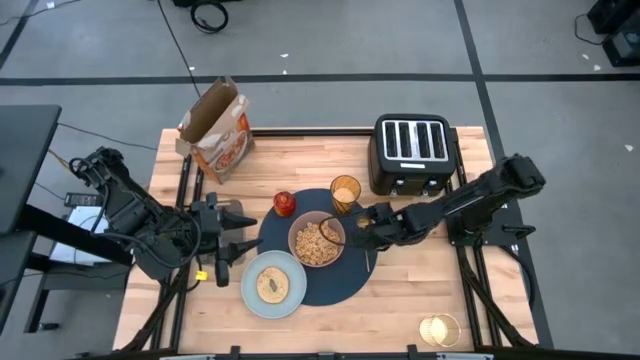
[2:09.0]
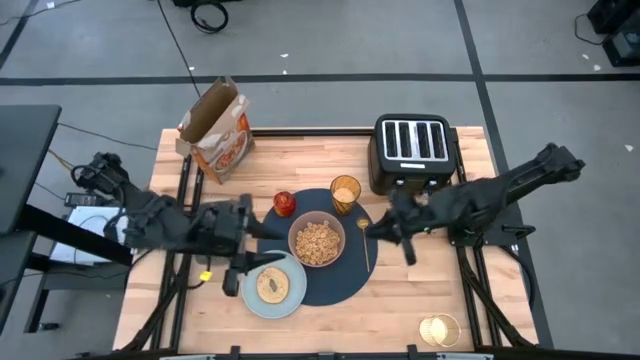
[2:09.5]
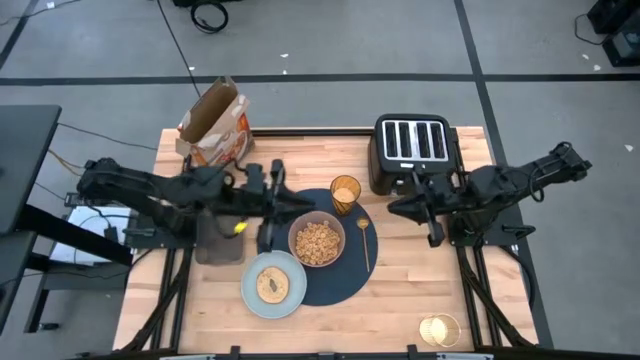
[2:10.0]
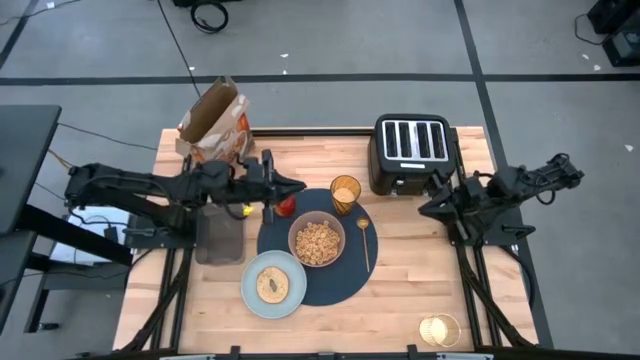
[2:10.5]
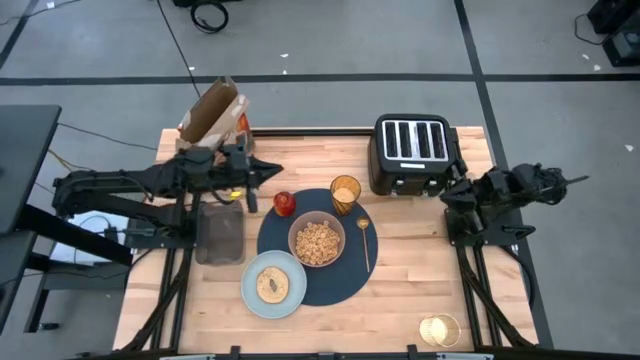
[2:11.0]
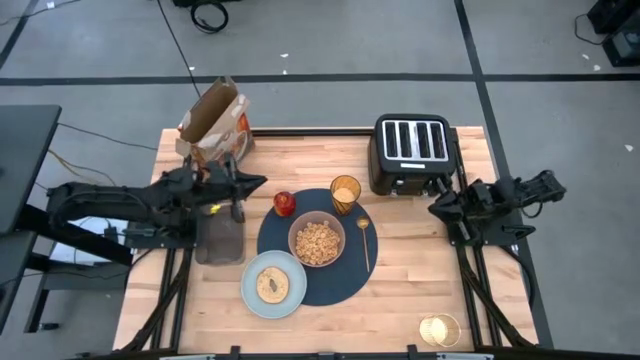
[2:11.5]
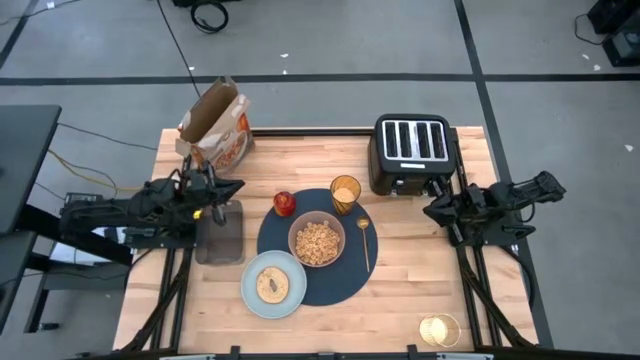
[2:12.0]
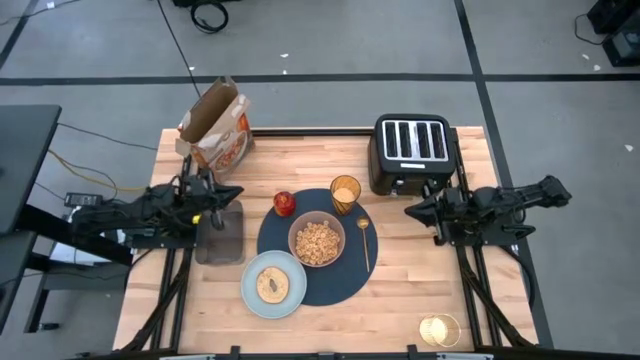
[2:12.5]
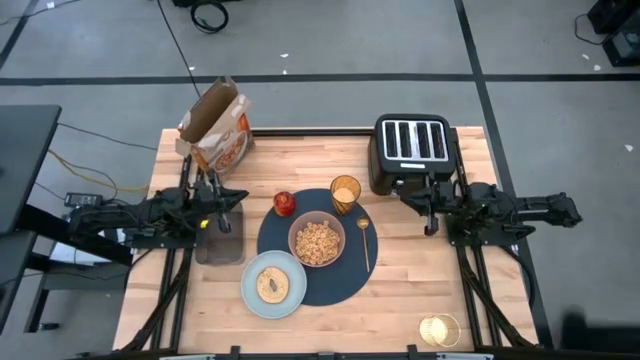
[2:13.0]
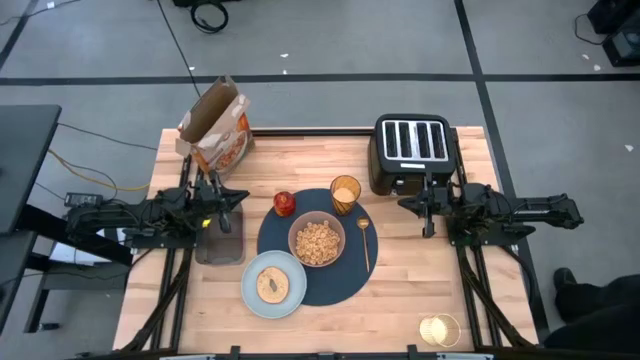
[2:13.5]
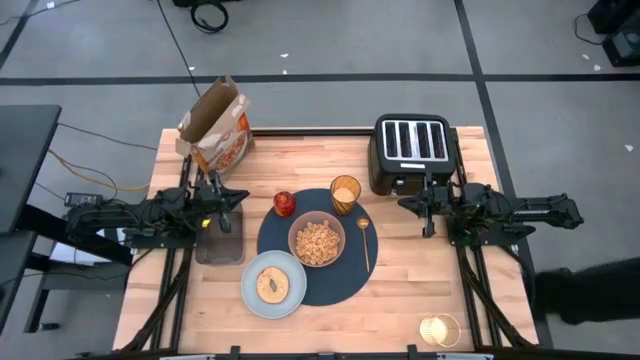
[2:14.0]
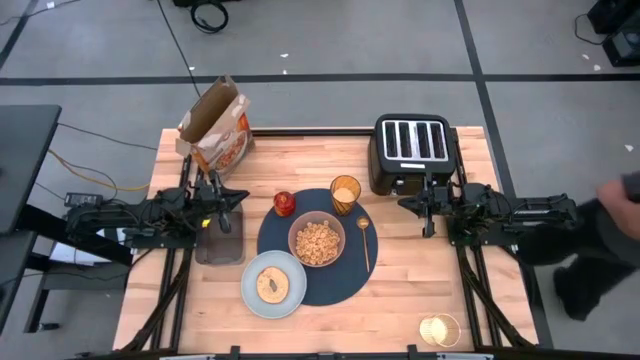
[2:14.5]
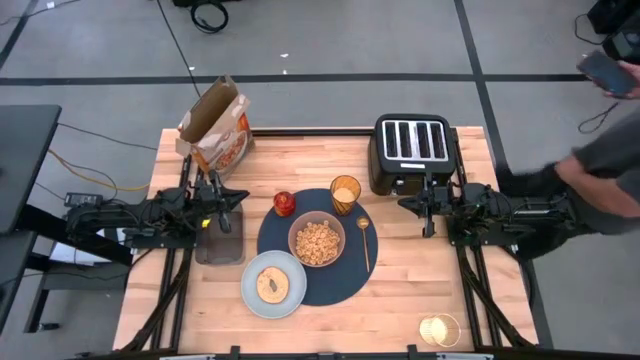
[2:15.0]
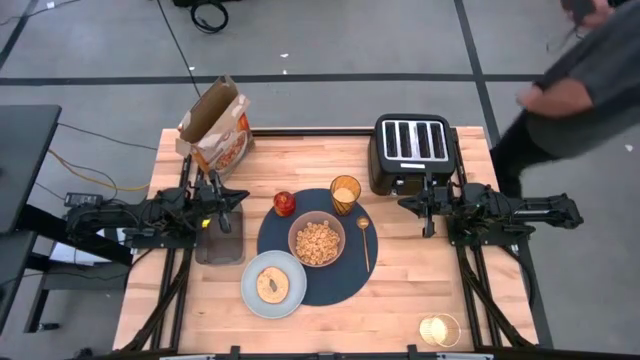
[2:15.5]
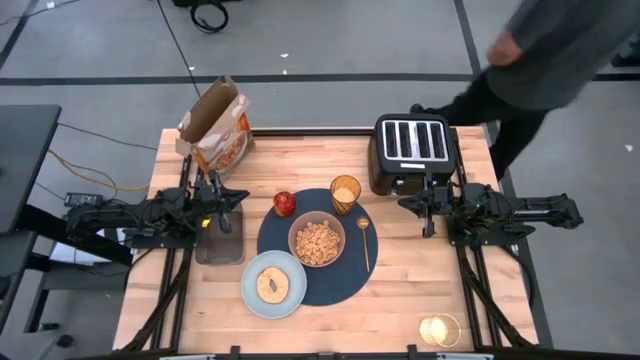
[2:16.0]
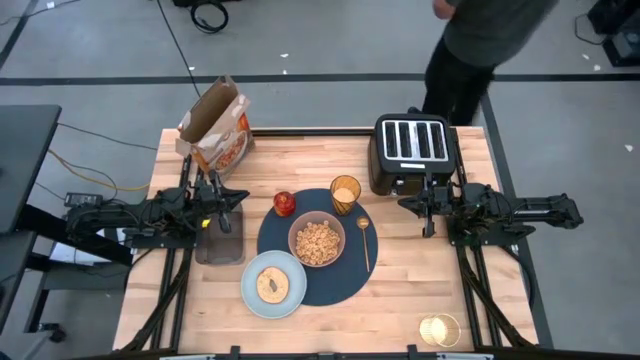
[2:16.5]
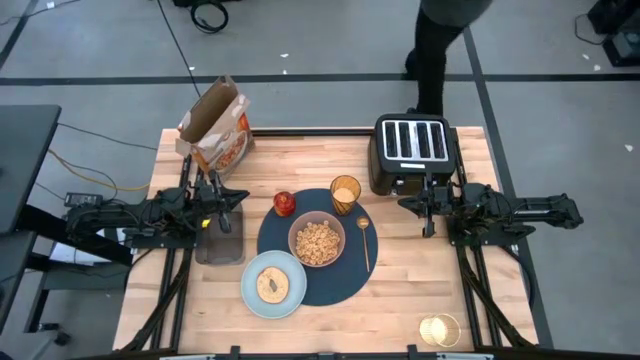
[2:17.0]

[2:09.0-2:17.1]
Task: Arrange a breakfast setting
Return to Home Position

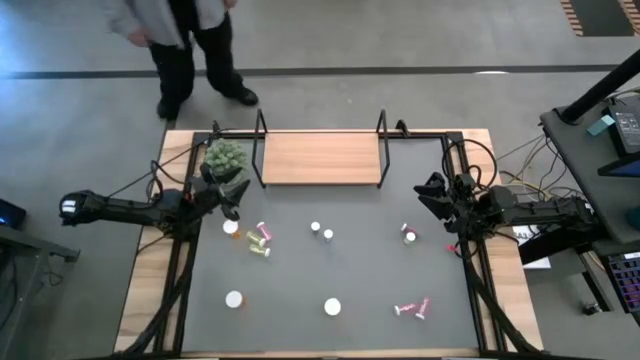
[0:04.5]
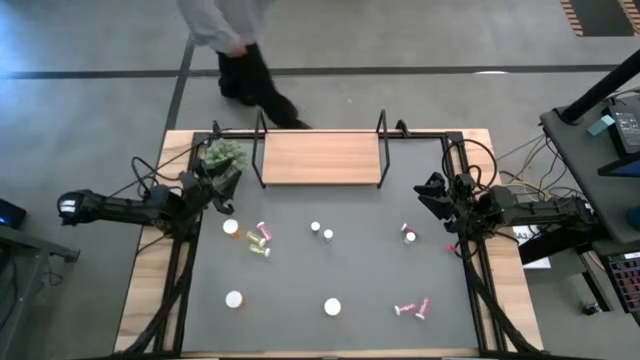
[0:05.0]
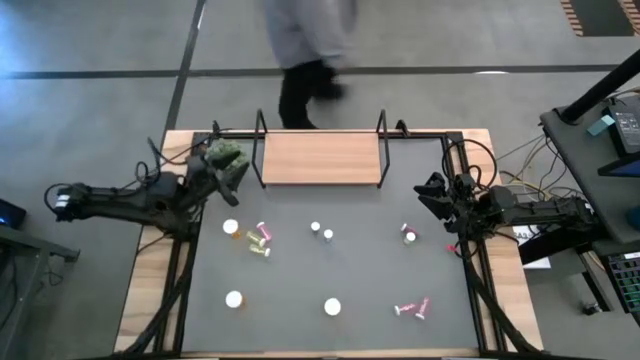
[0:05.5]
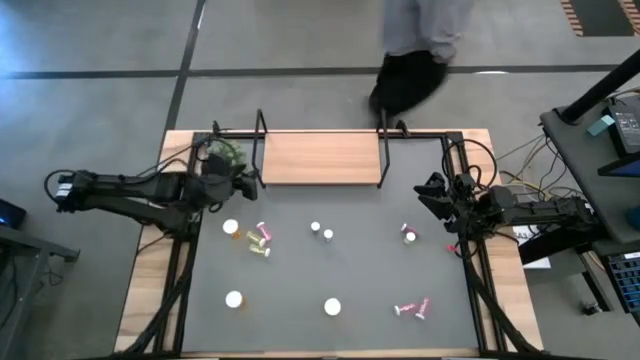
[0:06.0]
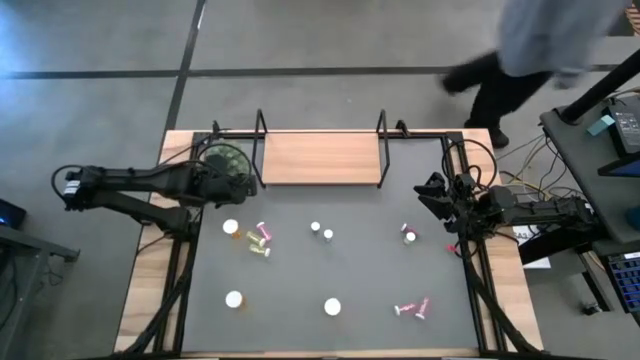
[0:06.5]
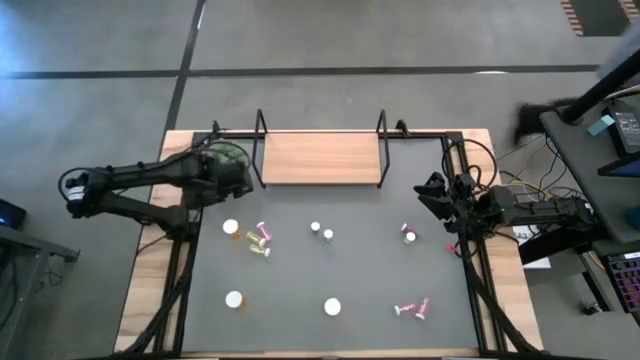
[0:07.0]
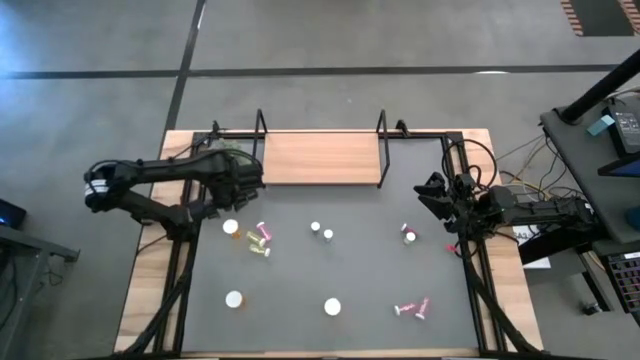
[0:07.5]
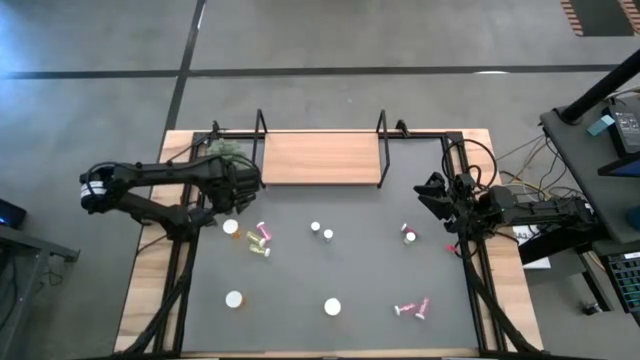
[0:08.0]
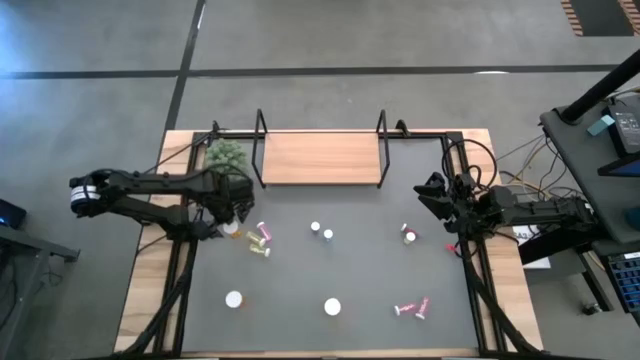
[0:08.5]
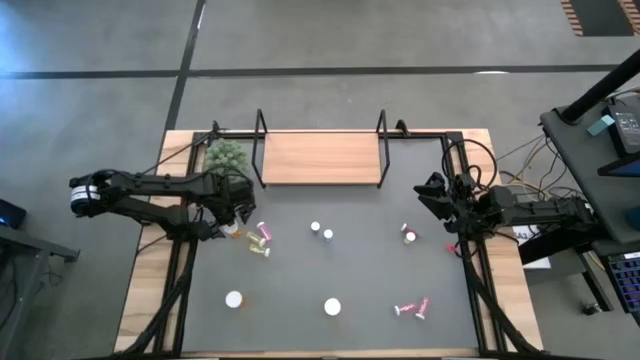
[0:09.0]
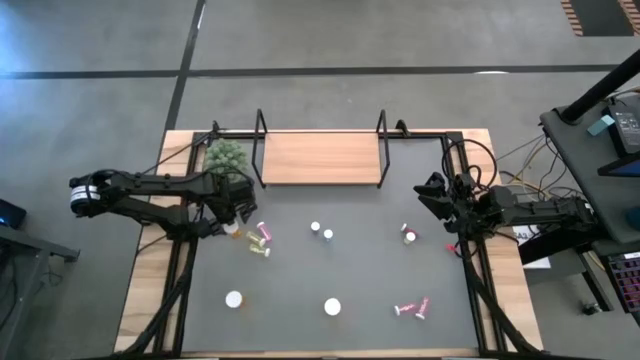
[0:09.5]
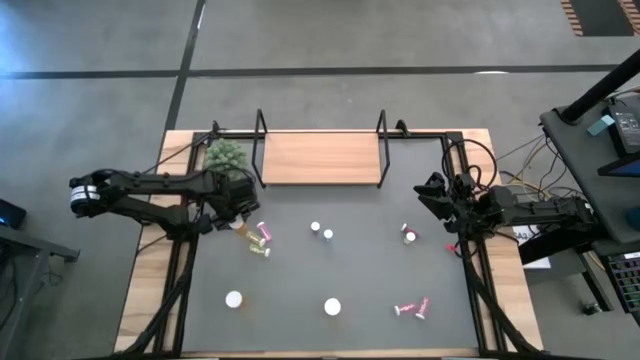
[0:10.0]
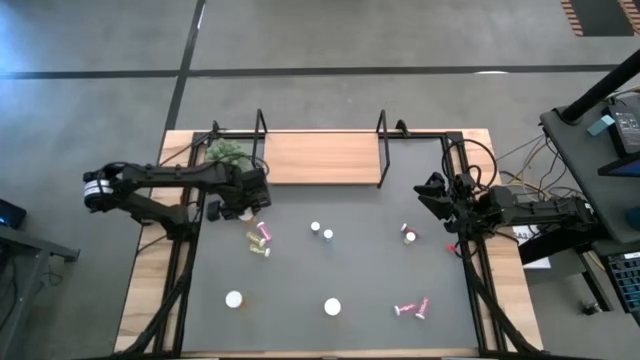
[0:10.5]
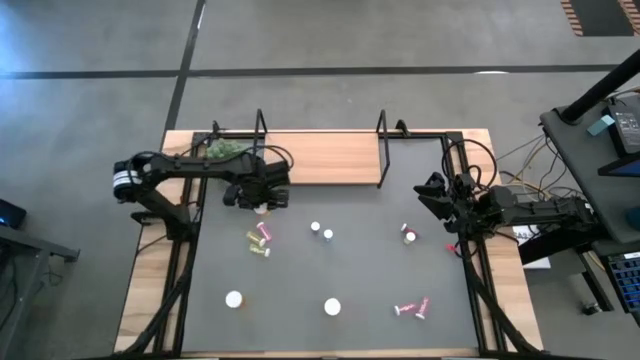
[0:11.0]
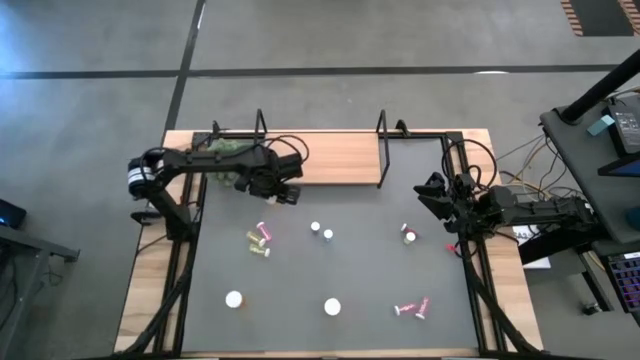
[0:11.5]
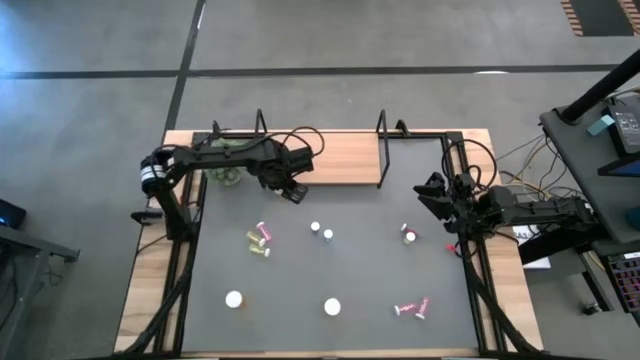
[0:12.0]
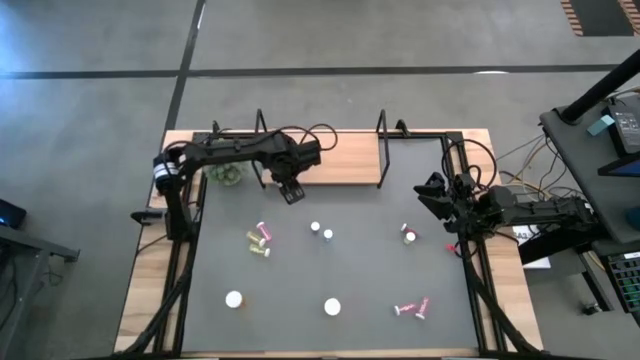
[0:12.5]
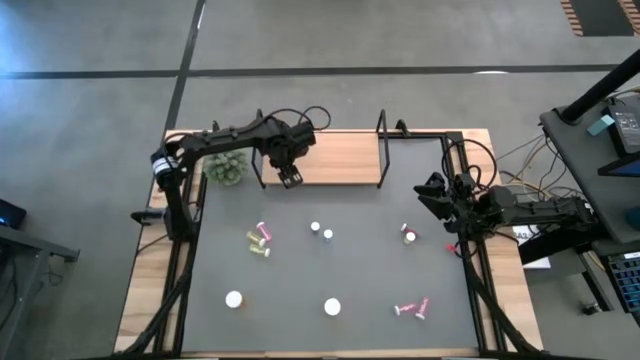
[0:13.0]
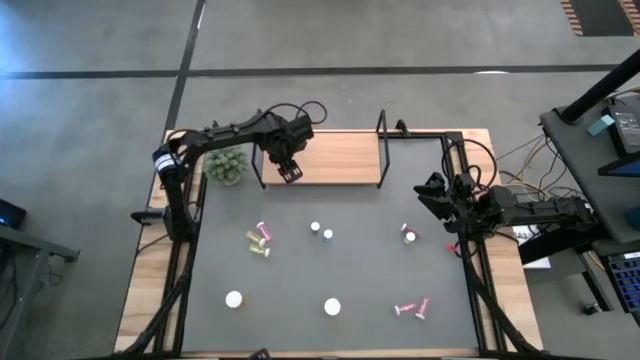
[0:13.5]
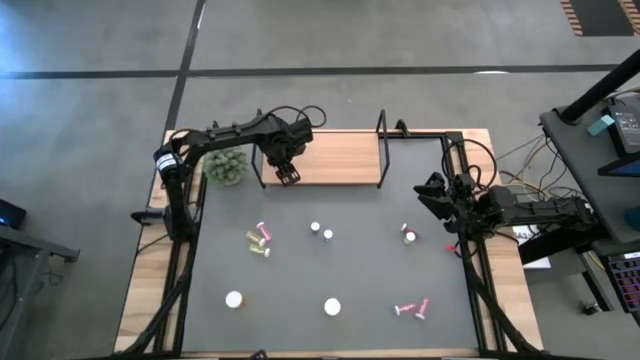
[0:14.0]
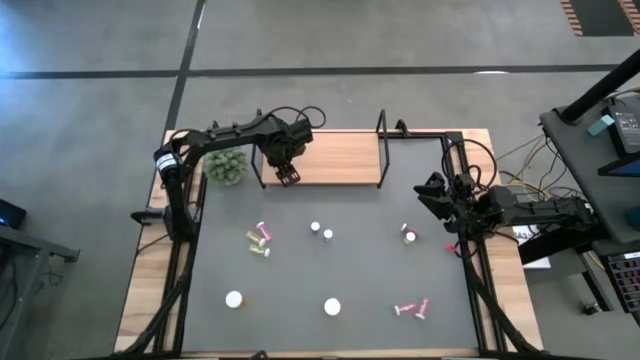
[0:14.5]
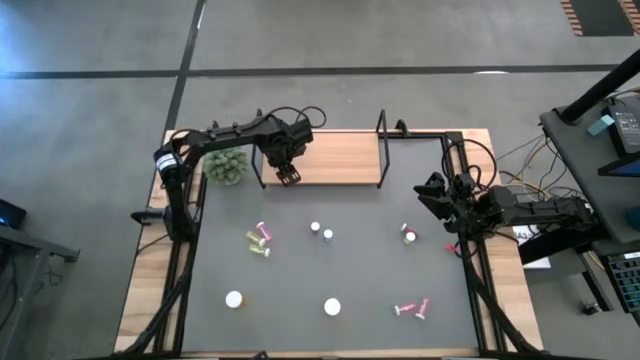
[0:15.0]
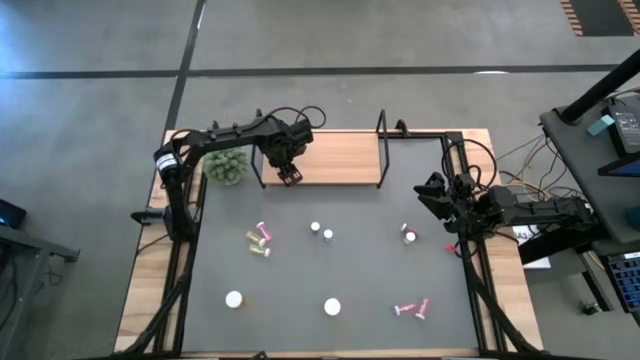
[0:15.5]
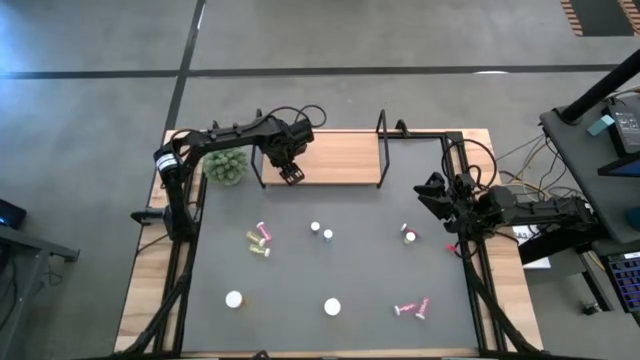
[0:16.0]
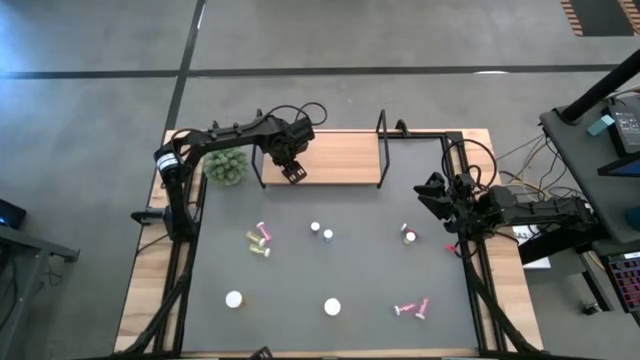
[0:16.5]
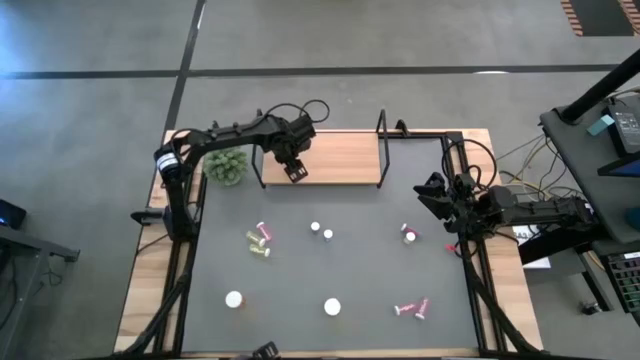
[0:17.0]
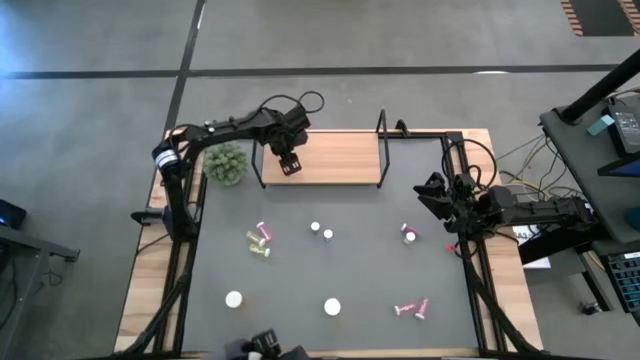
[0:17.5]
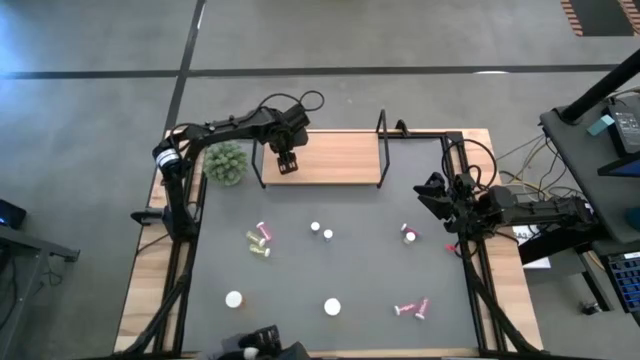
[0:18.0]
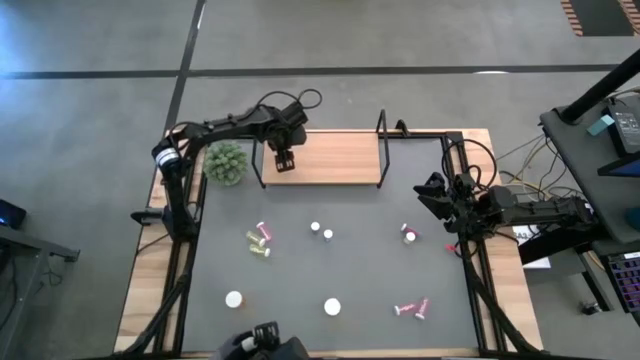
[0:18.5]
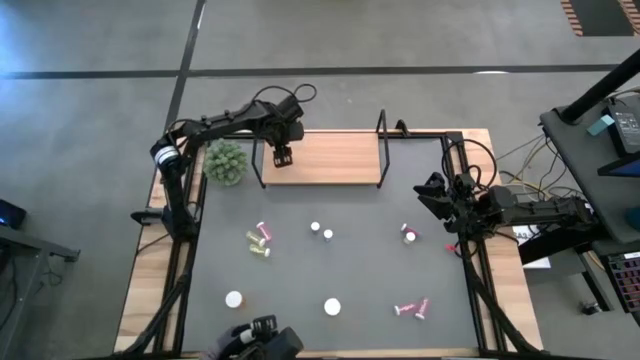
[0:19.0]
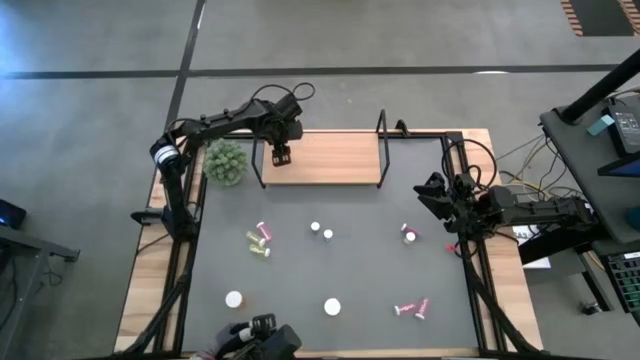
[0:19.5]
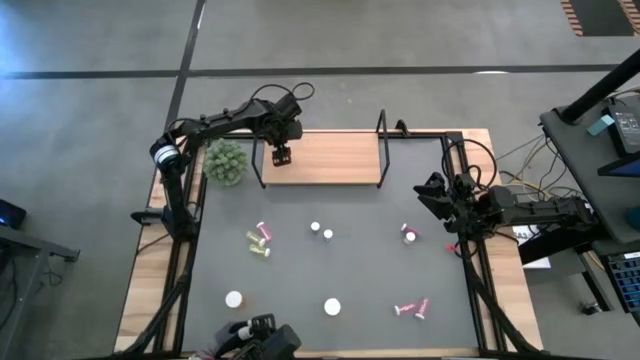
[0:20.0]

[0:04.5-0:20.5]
Task: Pick and place medicine bottles onto shelf by color
Put the top orange pill bottle on the shelf
